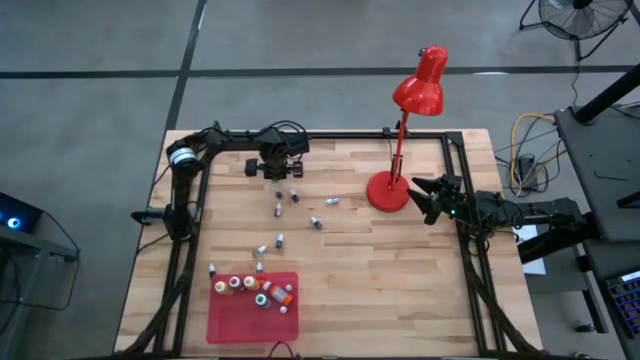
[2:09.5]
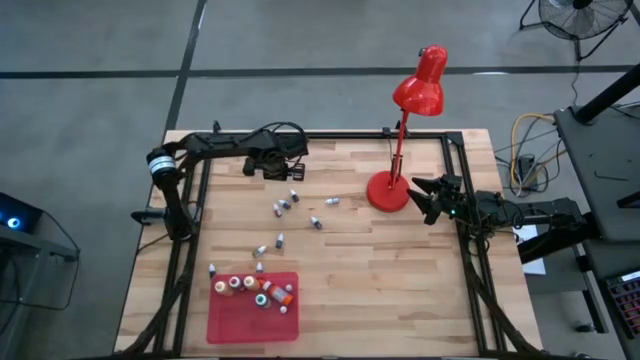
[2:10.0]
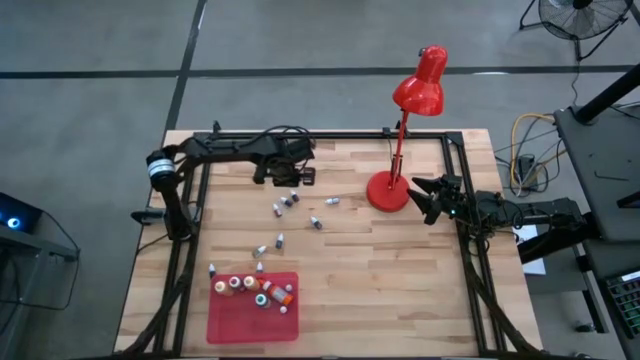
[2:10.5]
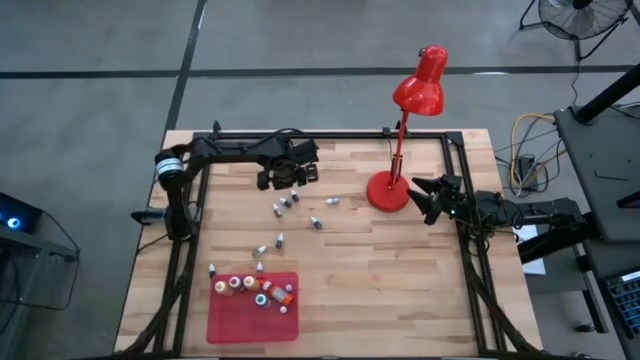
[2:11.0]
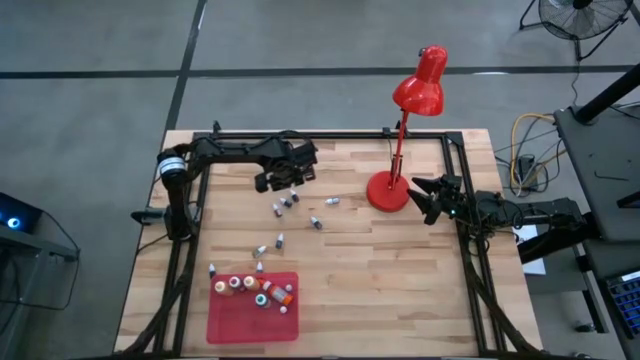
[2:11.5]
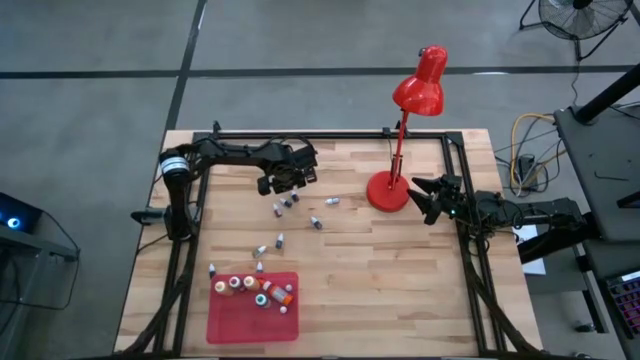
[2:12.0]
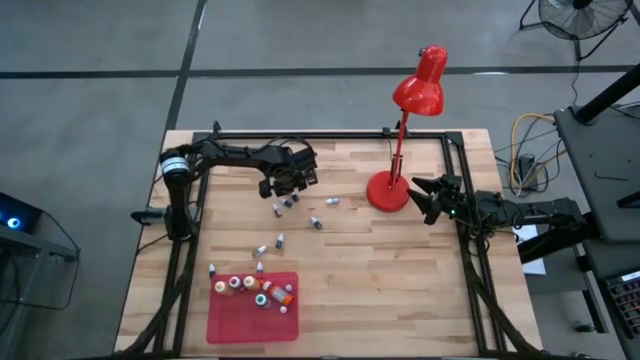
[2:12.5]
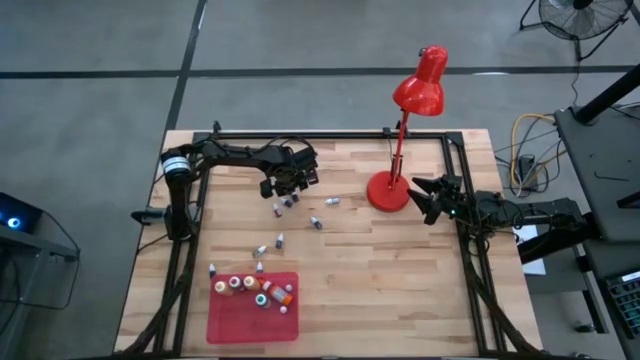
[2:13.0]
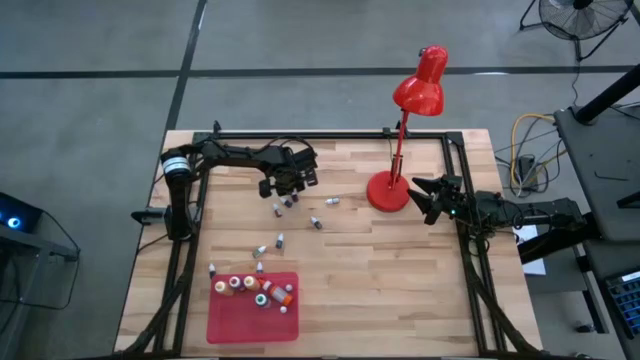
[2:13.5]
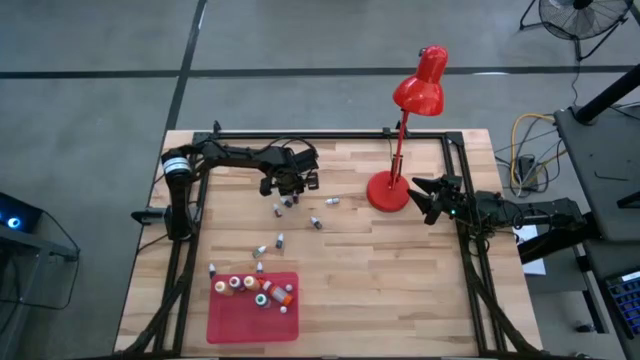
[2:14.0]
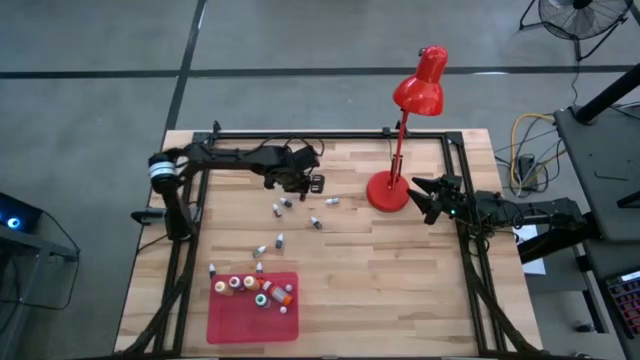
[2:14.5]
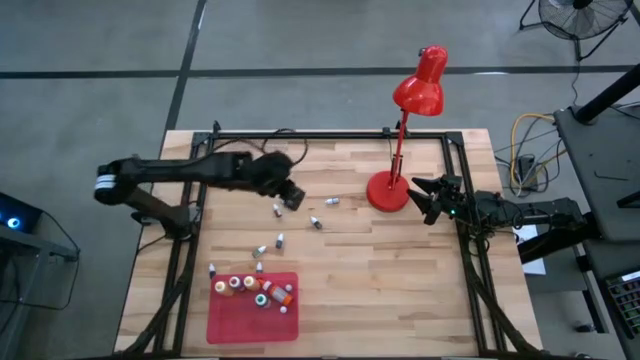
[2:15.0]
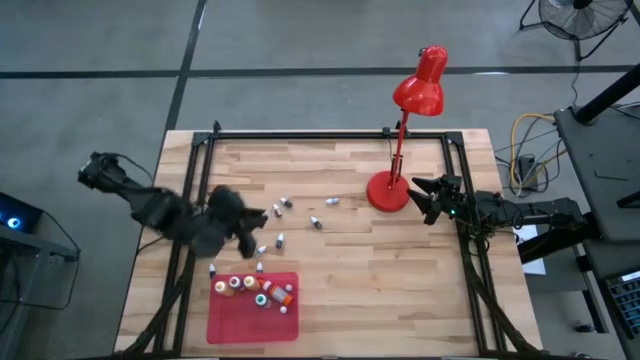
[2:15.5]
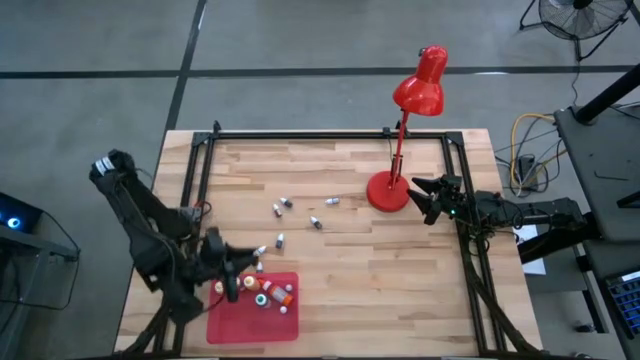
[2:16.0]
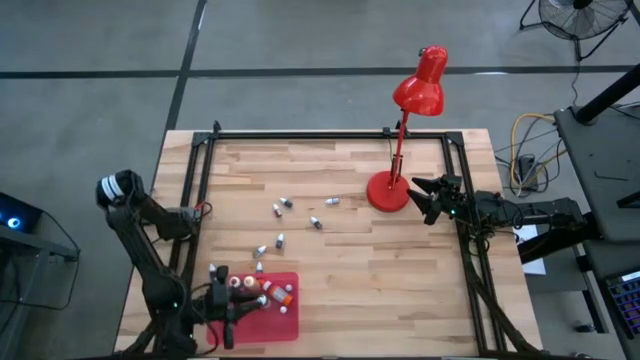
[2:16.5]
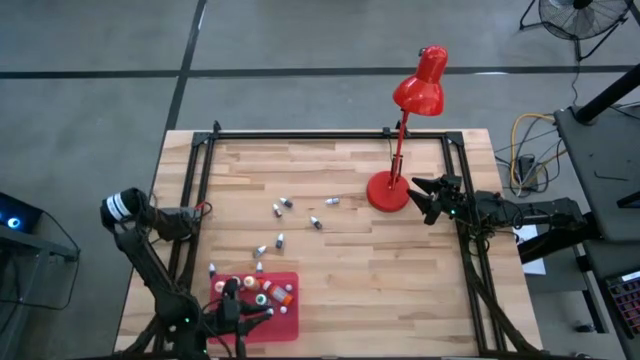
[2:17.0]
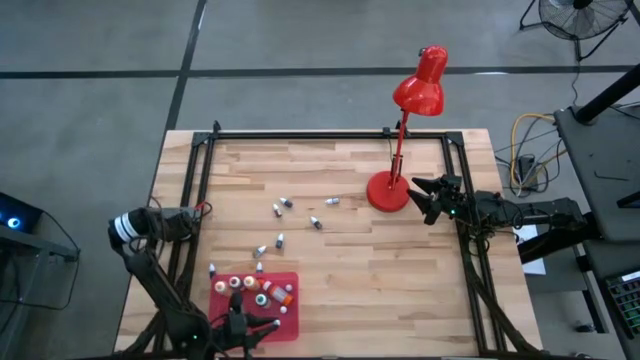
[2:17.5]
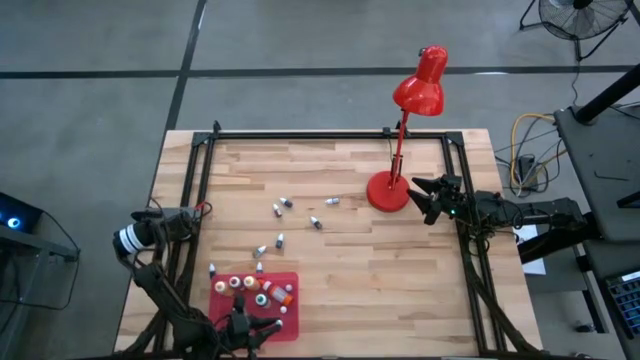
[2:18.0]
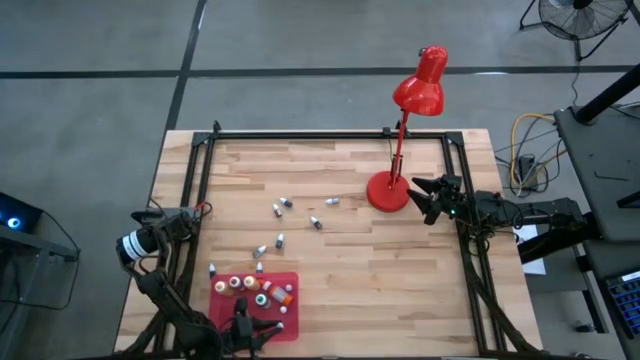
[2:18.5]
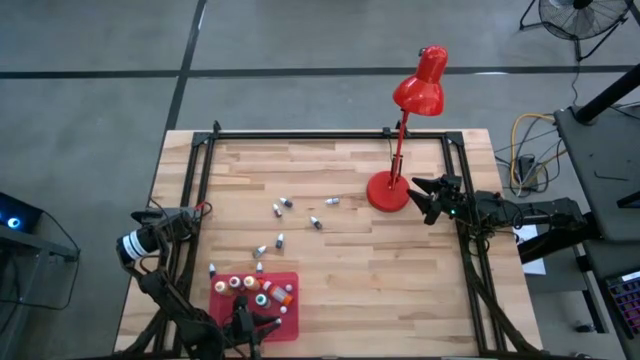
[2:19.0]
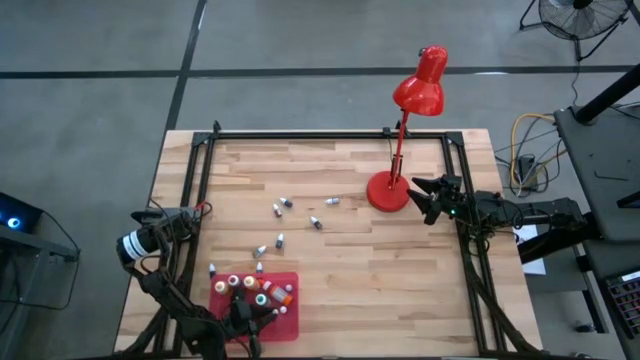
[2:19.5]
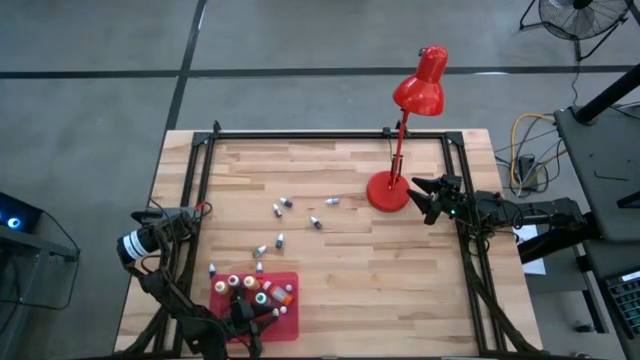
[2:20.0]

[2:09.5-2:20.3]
Task: Pick & Place food coloring
Put the small red food coloring bottle into the red bin

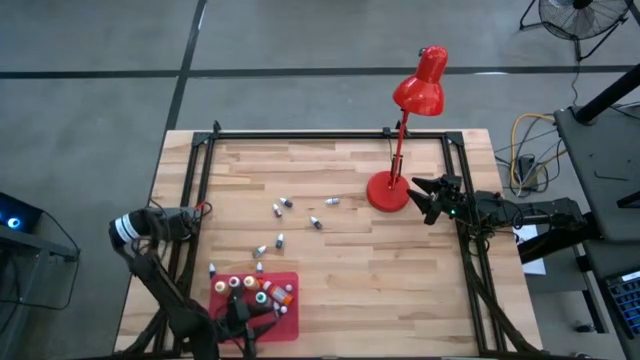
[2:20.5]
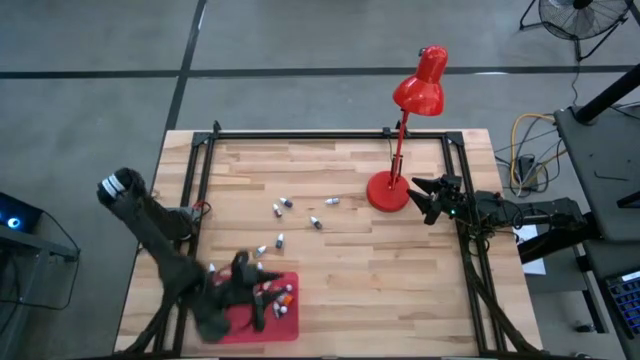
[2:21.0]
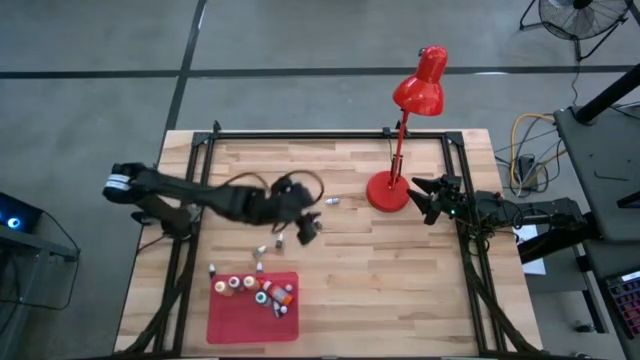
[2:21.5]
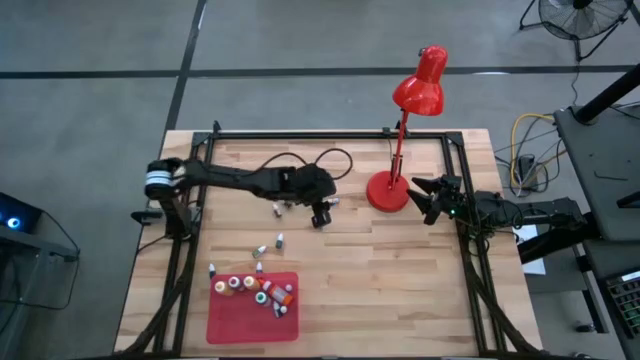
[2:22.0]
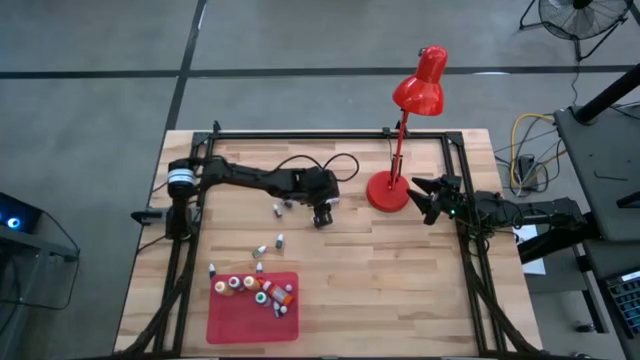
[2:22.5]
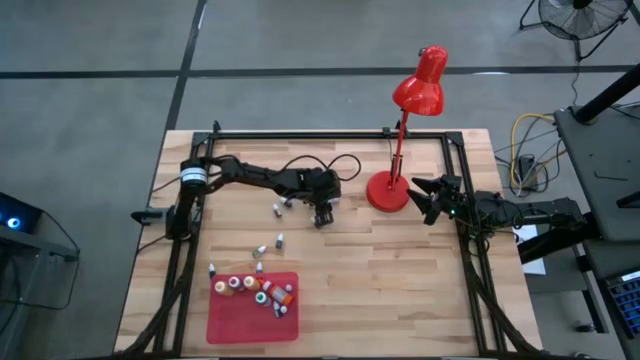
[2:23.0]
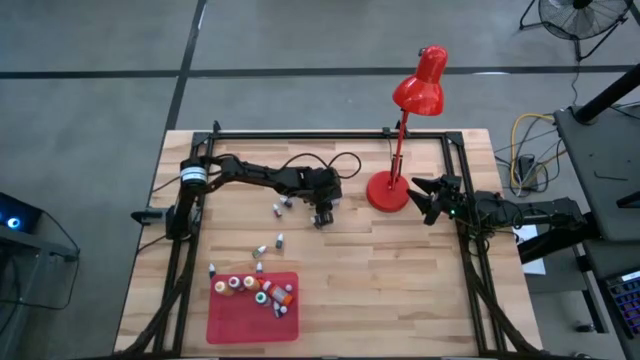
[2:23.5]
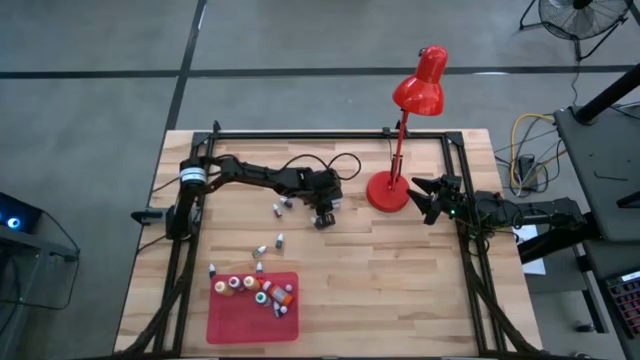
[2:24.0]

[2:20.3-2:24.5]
Put the small red food coloring bottle into the red bin

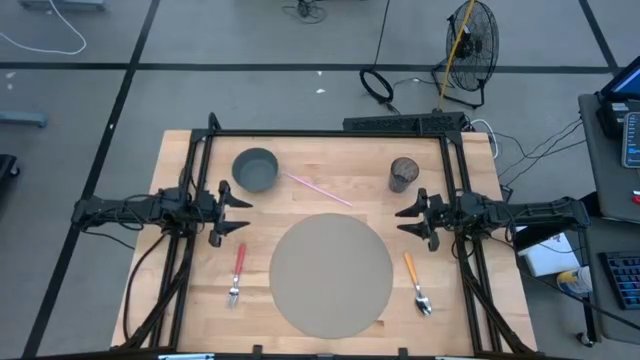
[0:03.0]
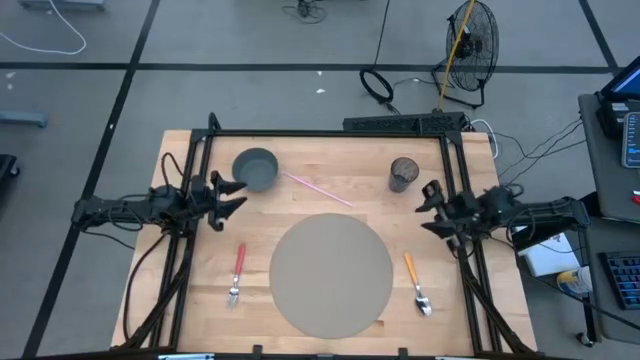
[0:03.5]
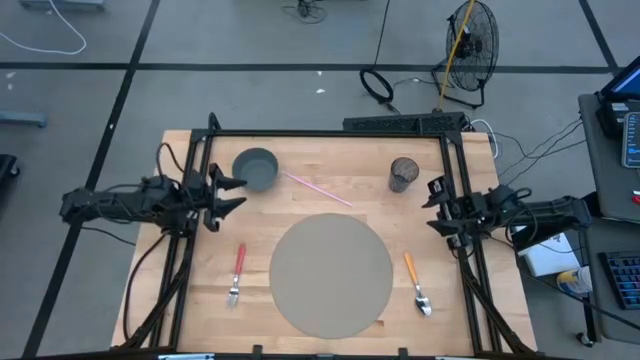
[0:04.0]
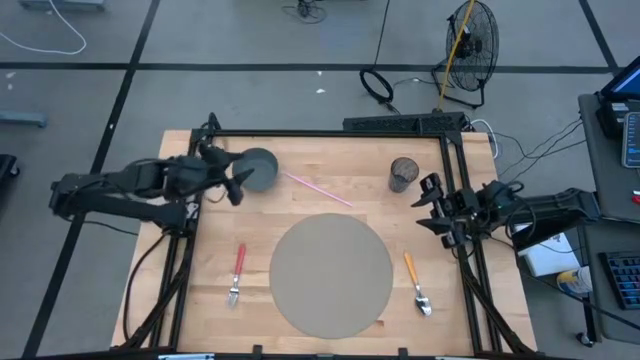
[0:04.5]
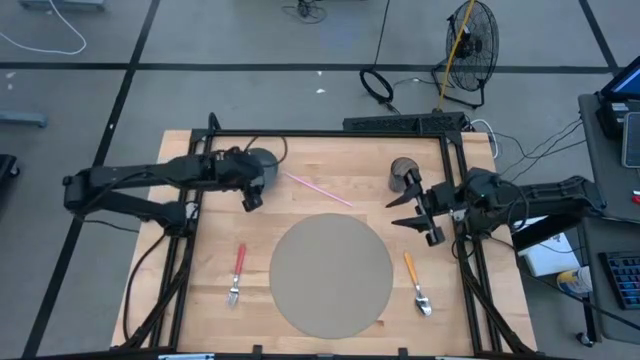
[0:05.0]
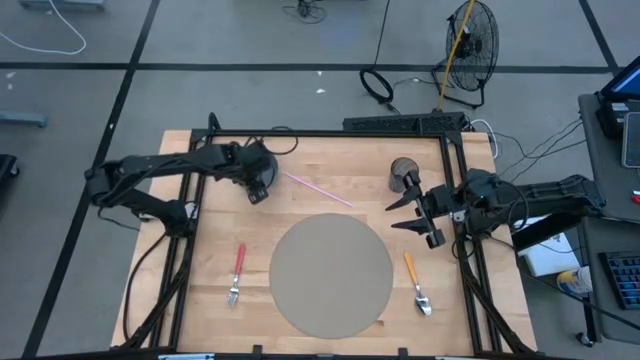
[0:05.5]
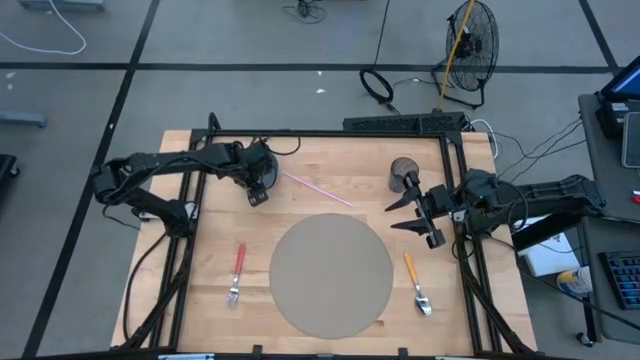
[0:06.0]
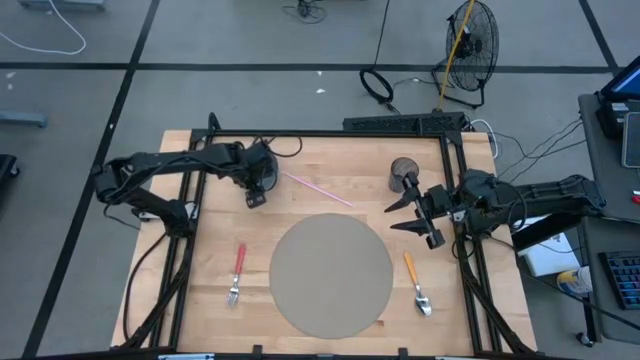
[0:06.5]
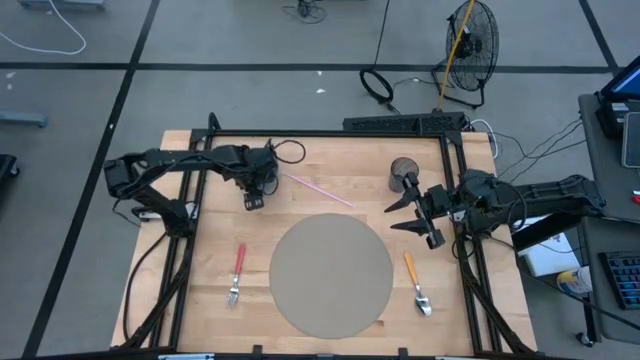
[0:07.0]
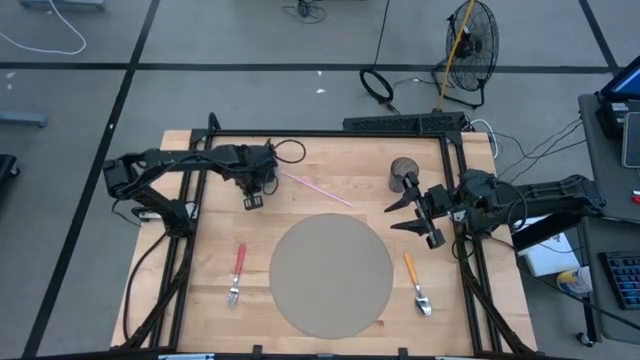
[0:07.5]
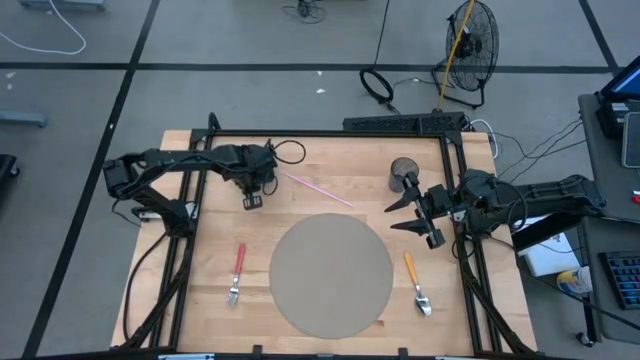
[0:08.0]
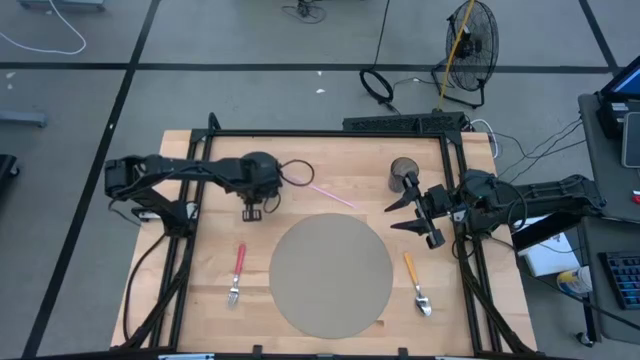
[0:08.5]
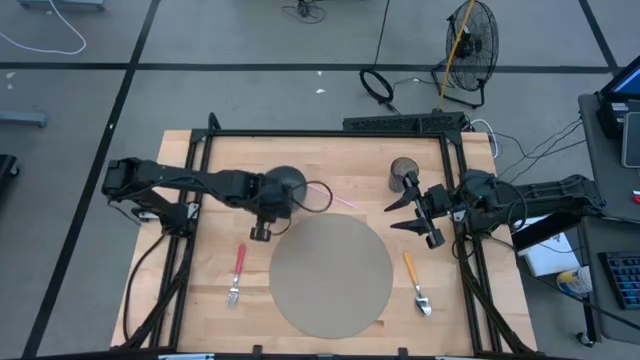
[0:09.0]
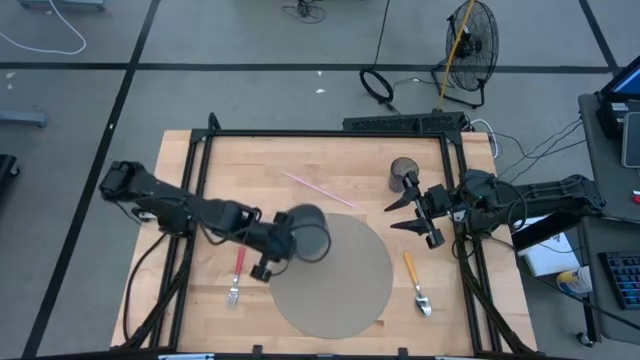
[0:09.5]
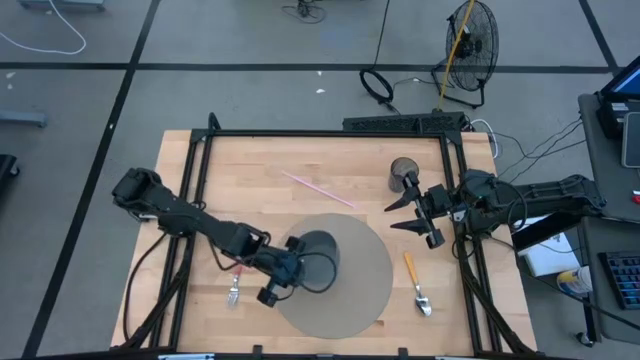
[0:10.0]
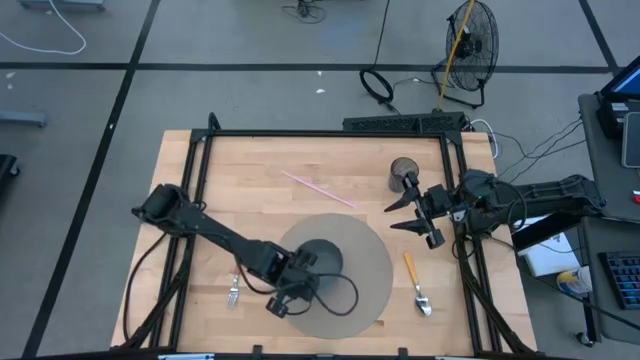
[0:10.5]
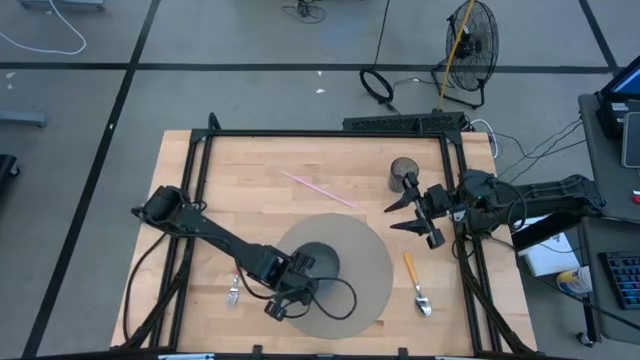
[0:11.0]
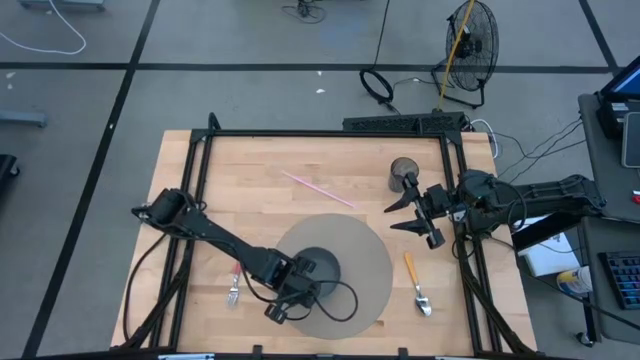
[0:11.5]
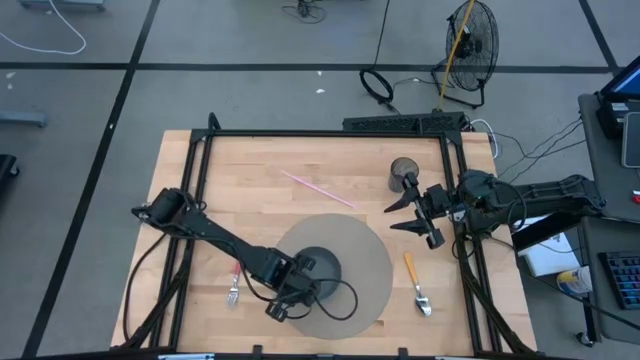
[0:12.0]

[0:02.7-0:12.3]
Task: Pick & Place Utensil
Put the blue bowl on the brown placemat
